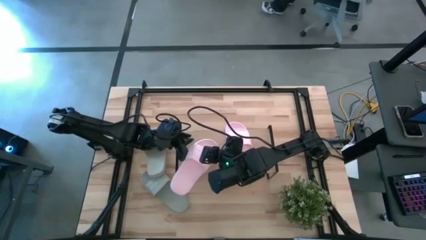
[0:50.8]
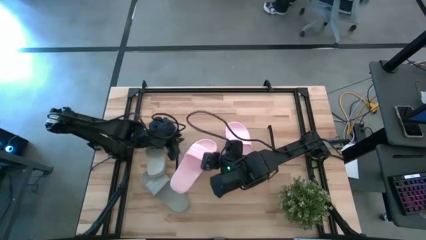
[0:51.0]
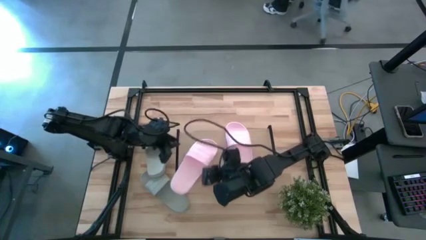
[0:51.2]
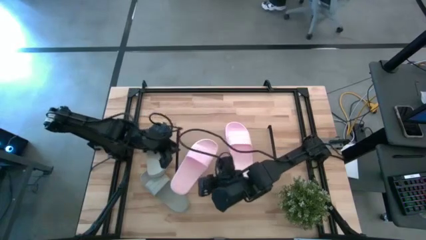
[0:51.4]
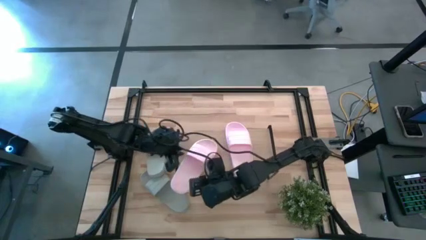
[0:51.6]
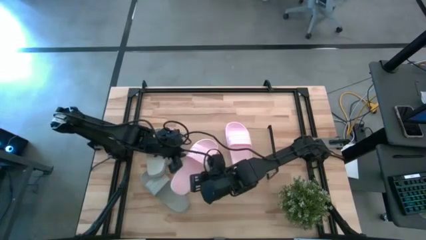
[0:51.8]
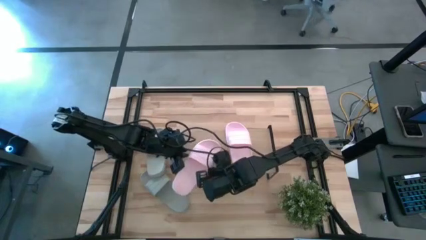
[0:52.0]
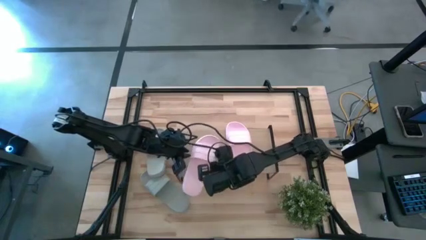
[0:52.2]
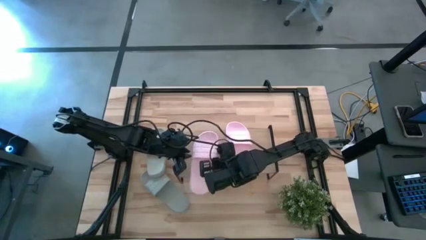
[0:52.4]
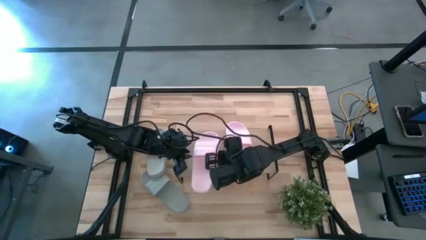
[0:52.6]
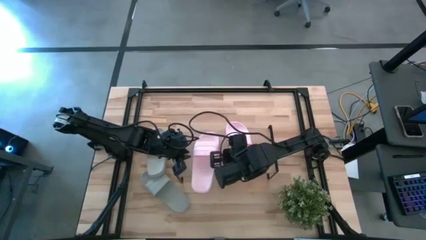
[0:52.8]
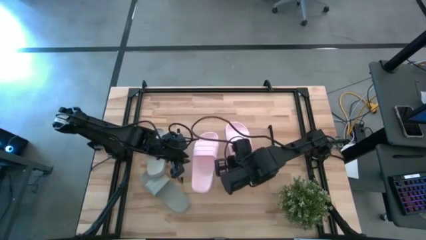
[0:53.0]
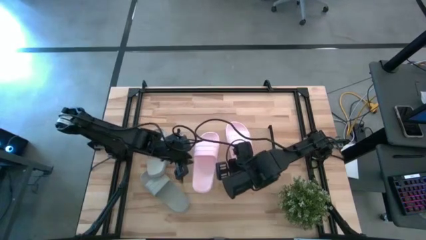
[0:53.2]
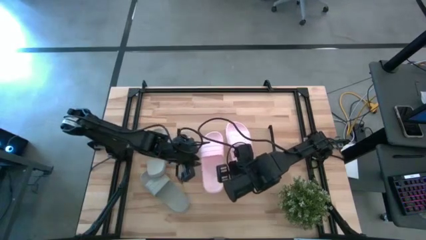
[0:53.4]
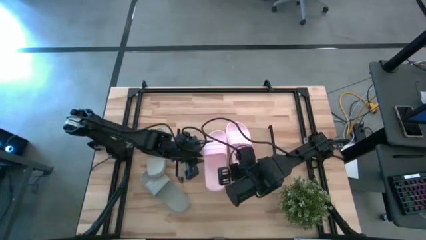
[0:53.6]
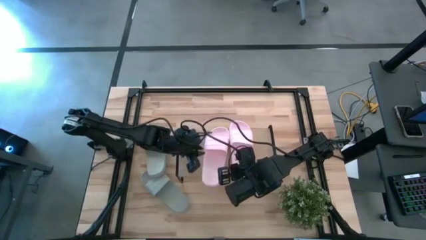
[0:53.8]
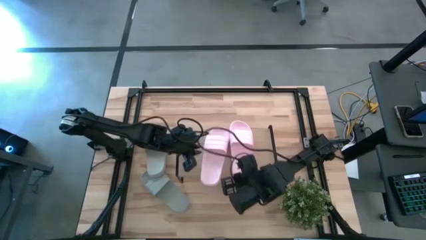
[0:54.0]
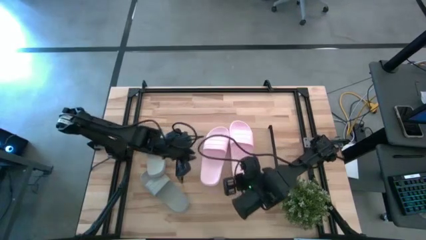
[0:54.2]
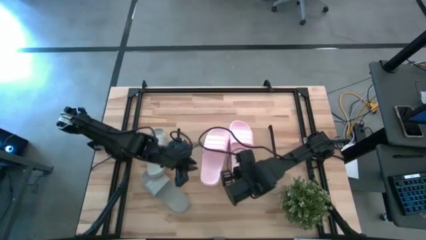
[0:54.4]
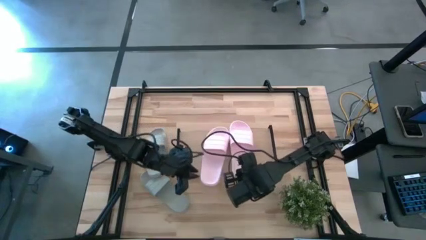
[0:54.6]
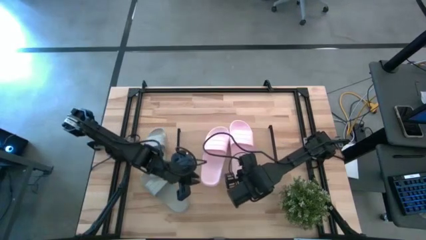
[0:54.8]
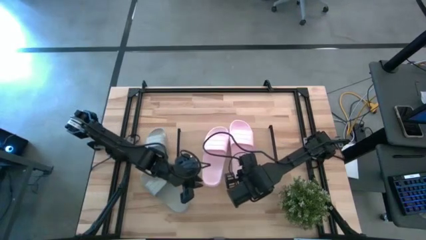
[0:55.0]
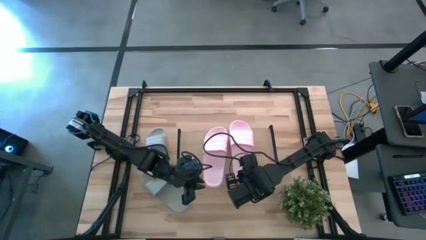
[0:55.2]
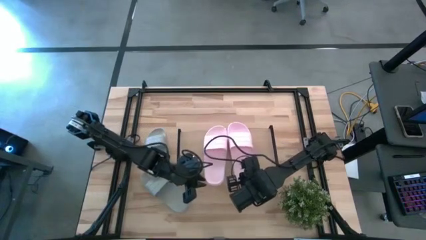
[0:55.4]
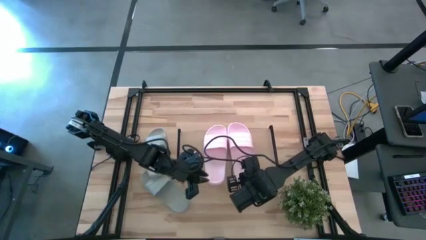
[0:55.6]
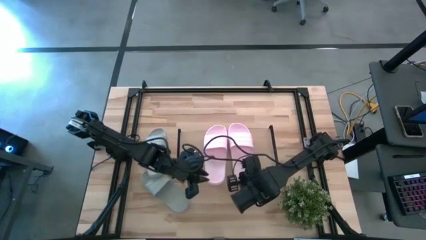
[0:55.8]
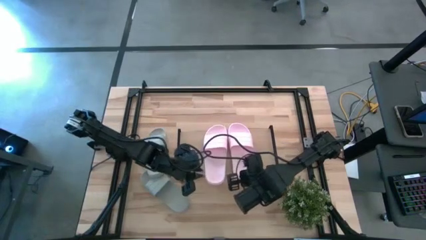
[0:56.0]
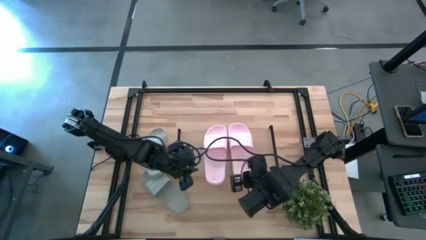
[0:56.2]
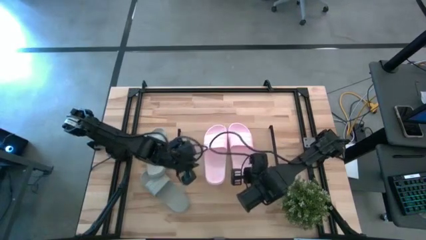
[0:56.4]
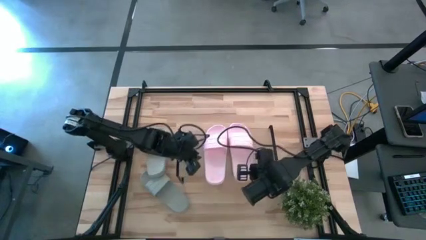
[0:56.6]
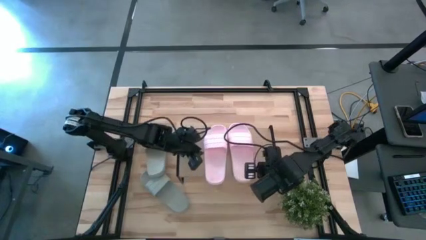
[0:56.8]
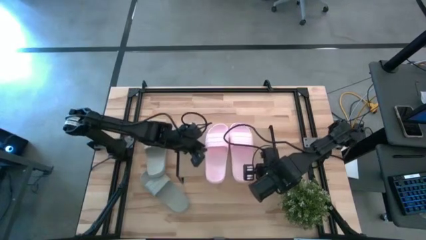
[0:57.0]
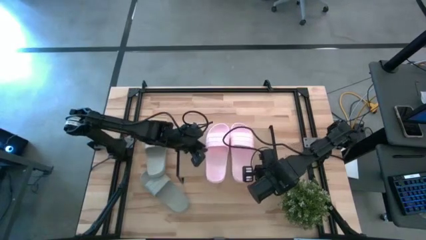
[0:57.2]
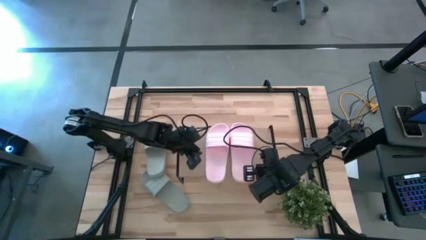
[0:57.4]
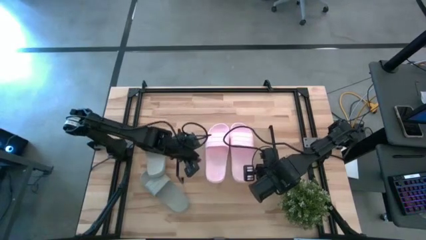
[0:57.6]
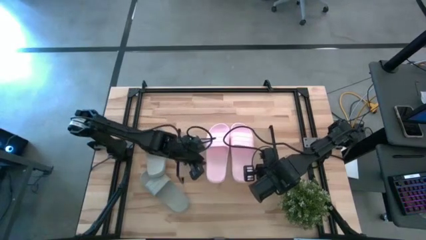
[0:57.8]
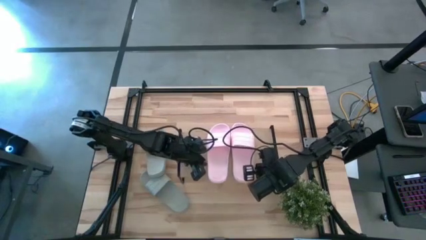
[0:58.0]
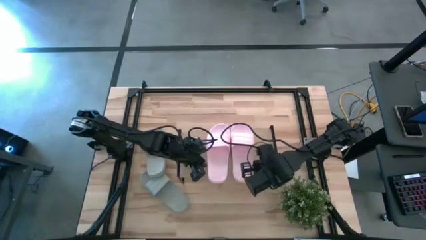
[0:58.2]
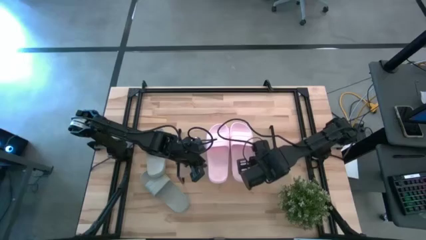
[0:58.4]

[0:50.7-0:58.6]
Task: Pick and place slides into the shelf
Put the pink slide on the shelf

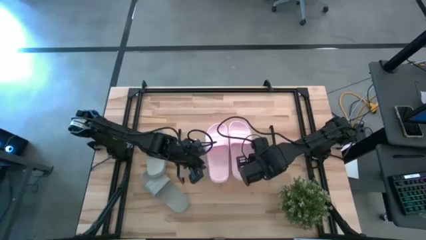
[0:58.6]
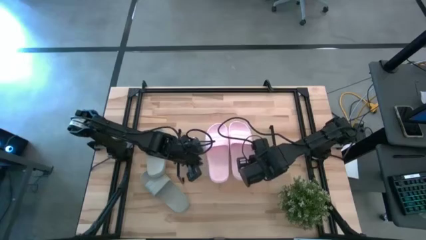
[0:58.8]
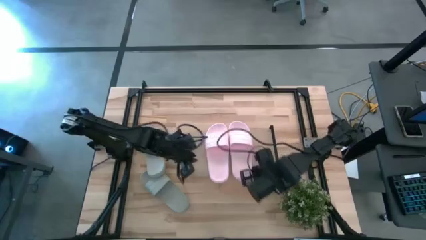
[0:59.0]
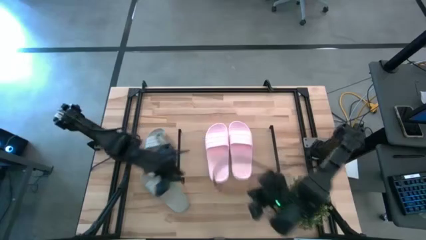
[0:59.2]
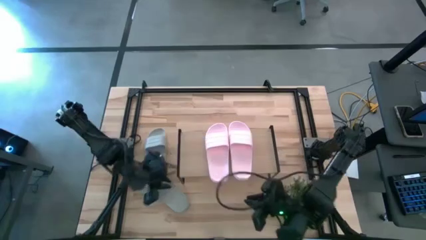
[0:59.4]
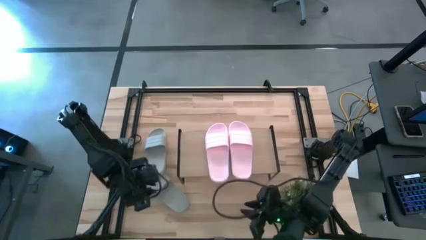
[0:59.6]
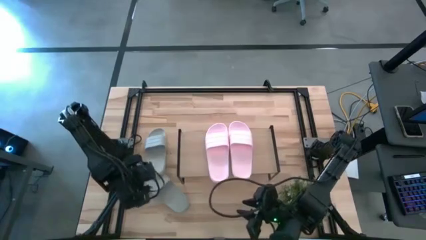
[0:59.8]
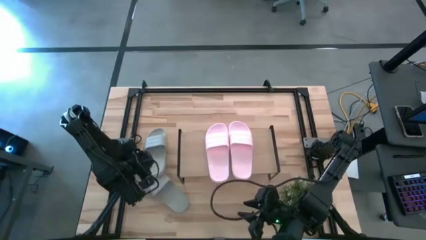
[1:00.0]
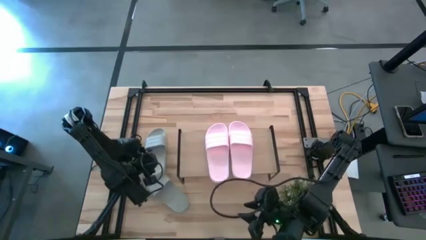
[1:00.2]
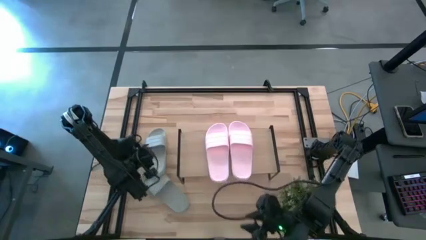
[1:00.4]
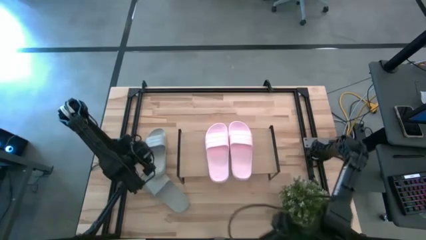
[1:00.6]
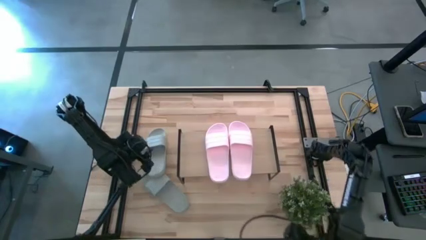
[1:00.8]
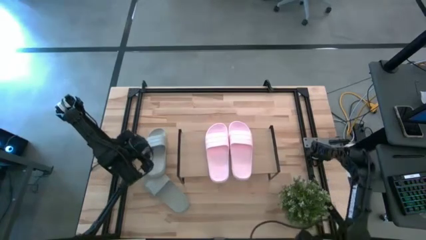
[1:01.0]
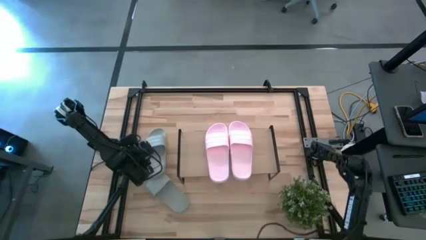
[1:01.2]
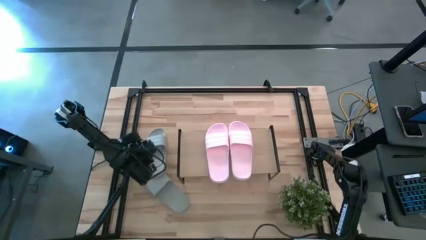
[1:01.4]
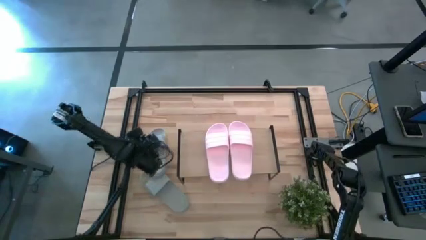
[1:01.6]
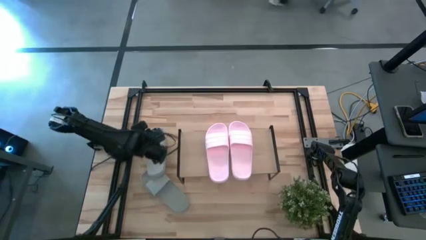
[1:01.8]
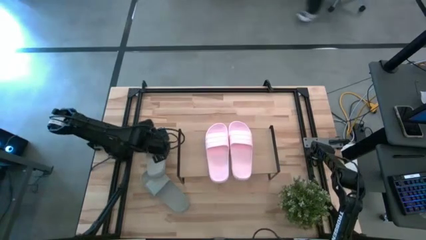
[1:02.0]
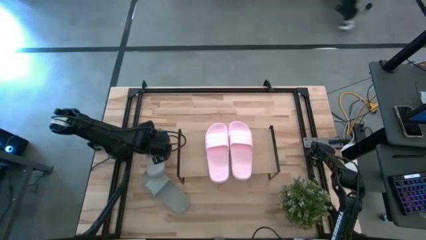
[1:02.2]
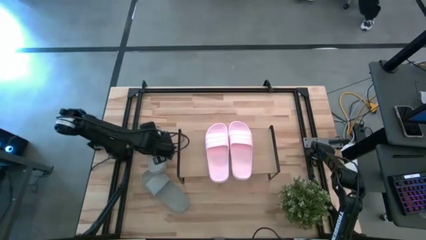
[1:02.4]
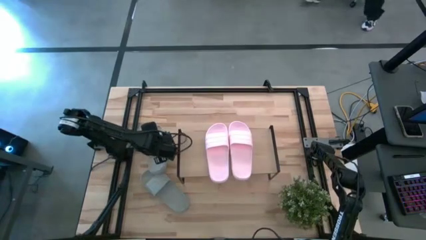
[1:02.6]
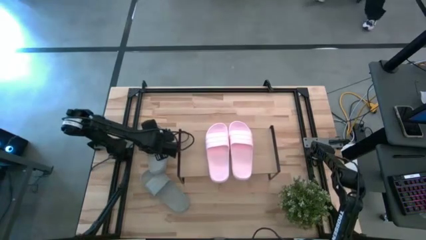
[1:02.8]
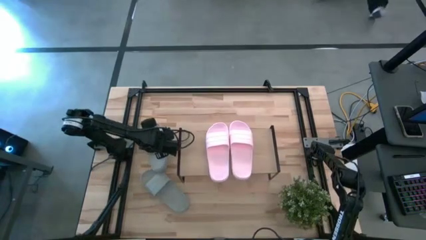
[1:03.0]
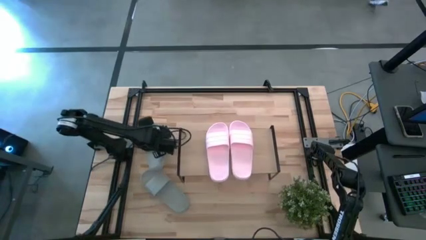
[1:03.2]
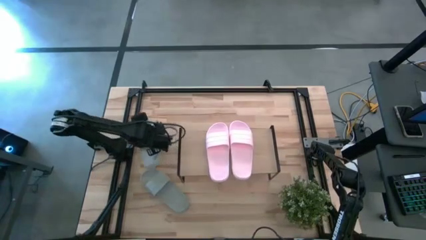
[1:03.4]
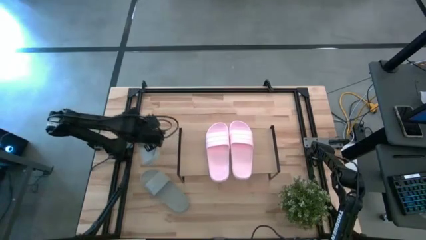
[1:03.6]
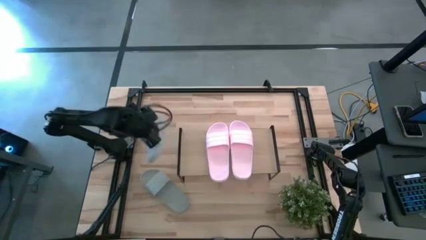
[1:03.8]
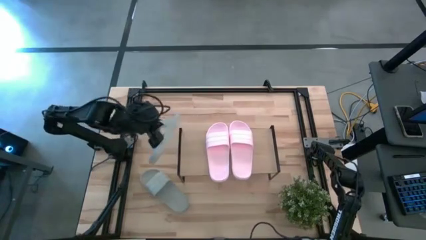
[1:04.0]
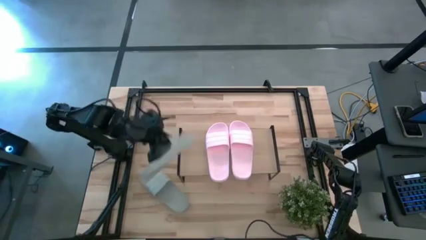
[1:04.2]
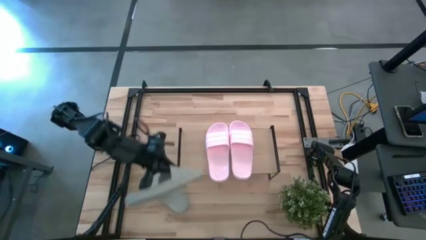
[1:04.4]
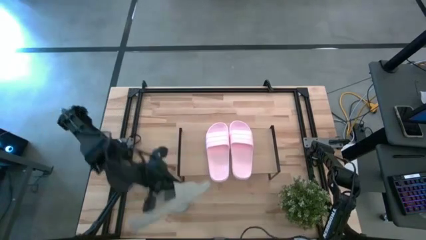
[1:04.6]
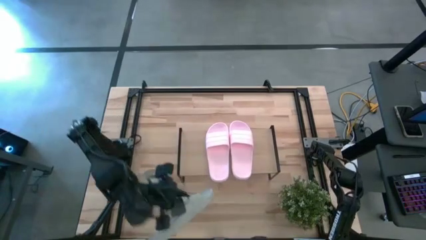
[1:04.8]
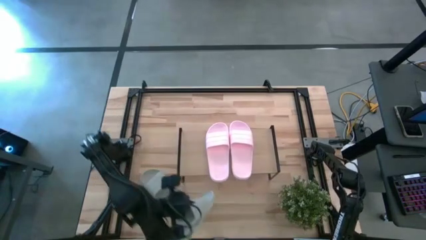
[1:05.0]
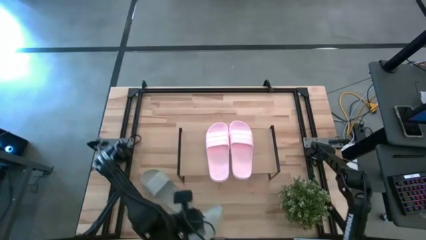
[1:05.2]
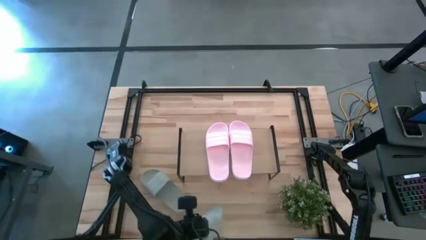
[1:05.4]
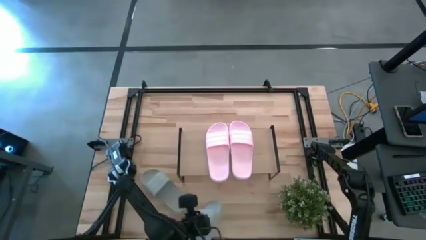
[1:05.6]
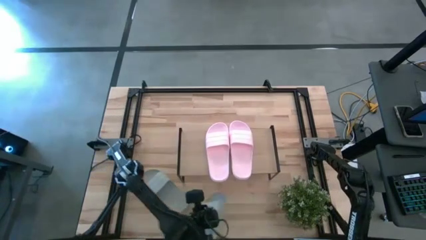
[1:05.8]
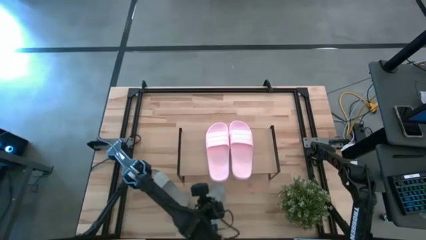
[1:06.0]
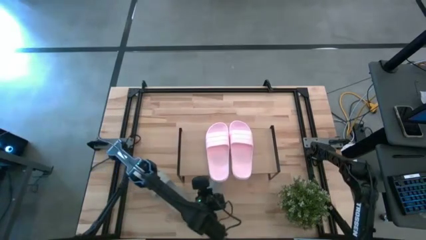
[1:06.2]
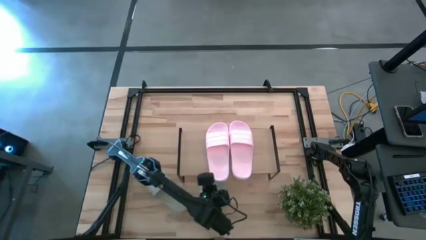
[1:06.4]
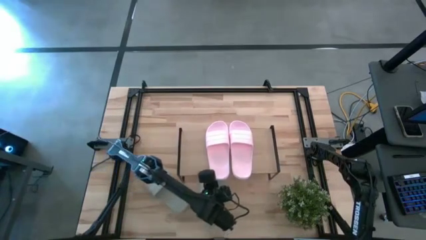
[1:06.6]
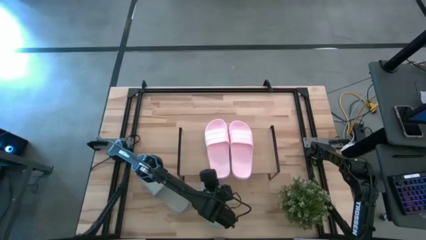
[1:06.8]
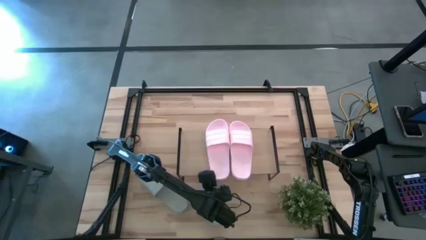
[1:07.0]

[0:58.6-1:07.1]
Put the top gray slide under the shelf
